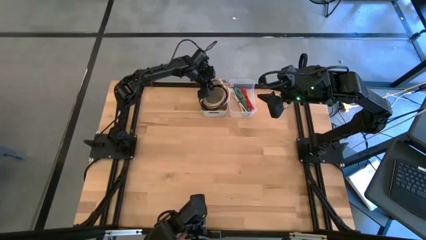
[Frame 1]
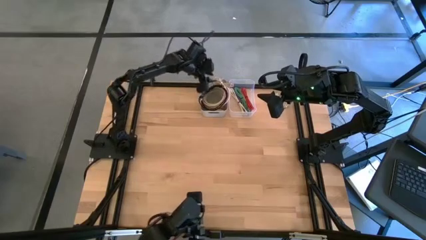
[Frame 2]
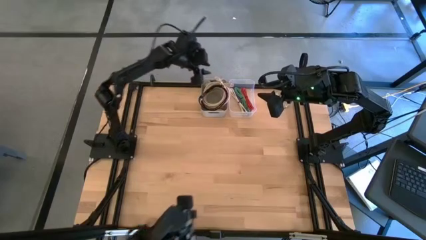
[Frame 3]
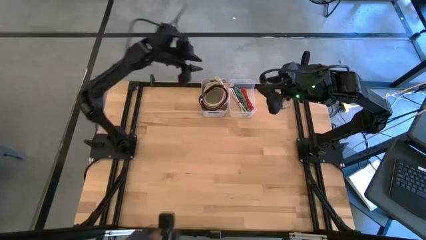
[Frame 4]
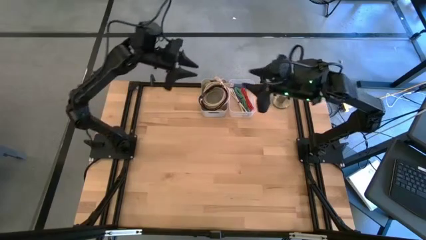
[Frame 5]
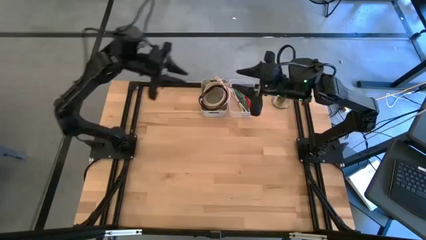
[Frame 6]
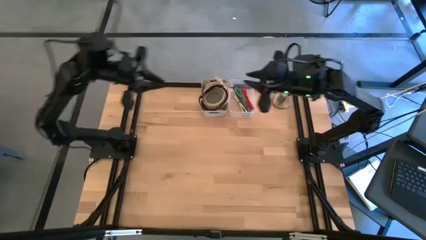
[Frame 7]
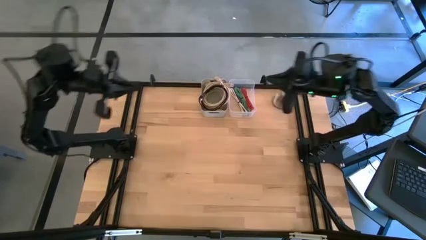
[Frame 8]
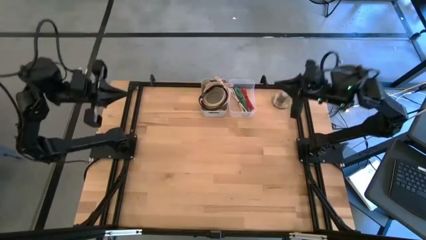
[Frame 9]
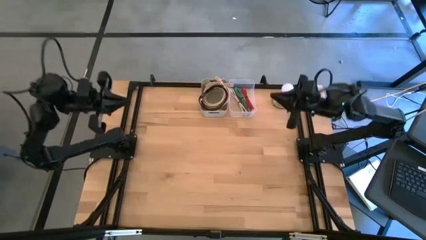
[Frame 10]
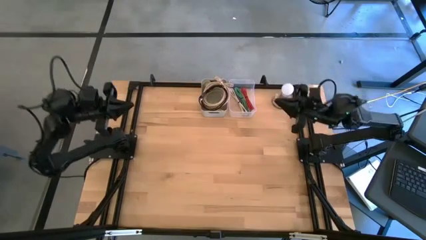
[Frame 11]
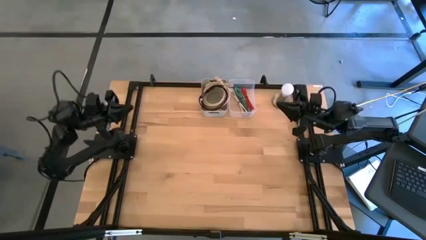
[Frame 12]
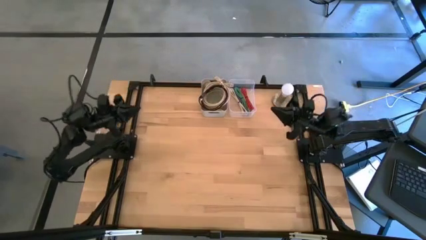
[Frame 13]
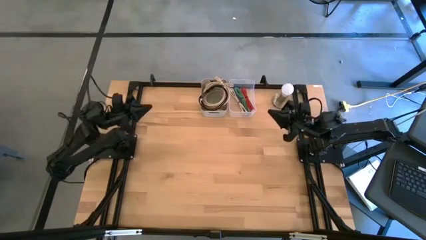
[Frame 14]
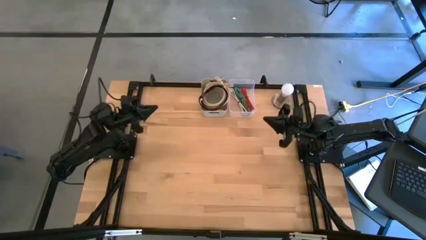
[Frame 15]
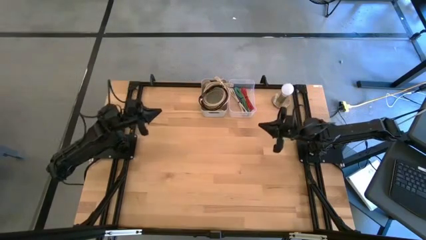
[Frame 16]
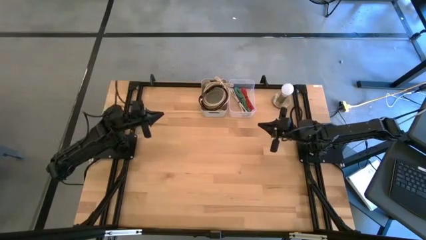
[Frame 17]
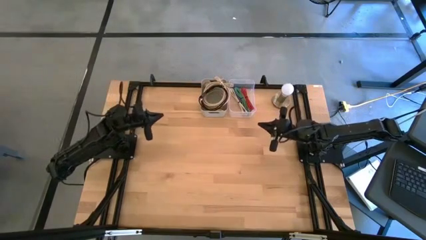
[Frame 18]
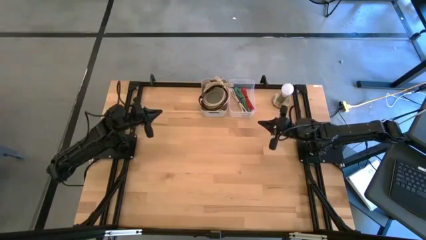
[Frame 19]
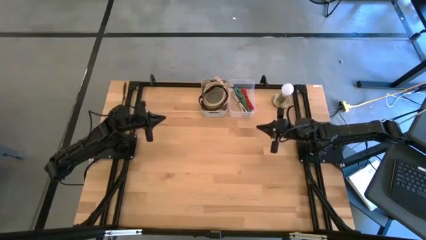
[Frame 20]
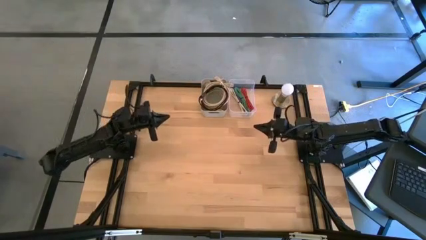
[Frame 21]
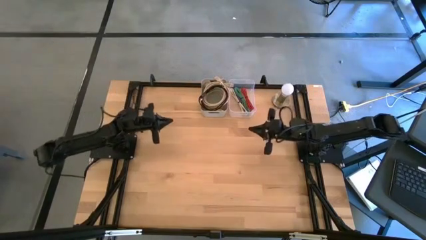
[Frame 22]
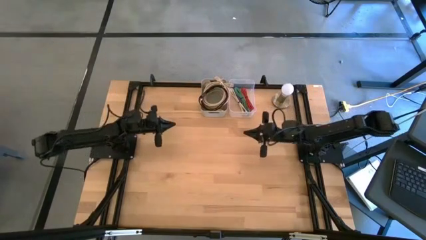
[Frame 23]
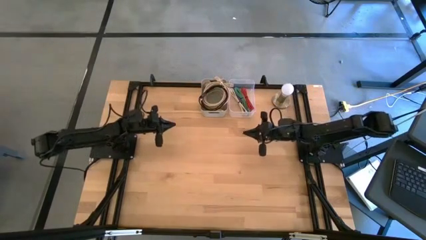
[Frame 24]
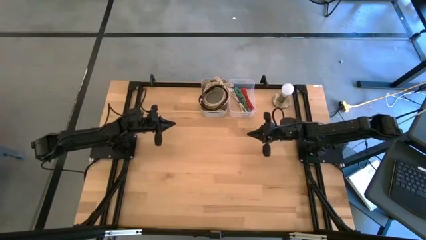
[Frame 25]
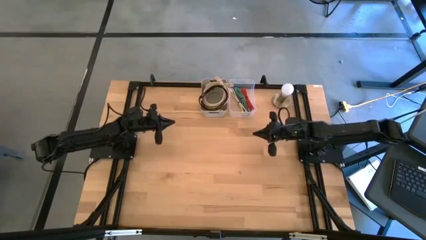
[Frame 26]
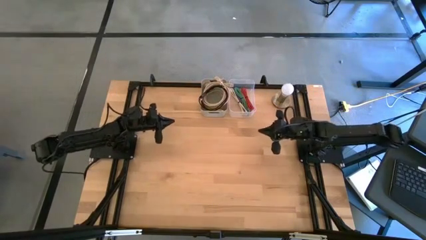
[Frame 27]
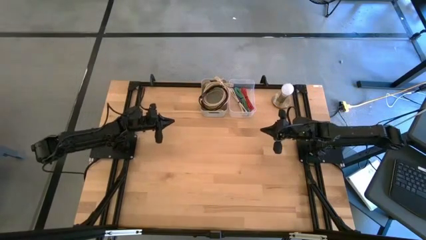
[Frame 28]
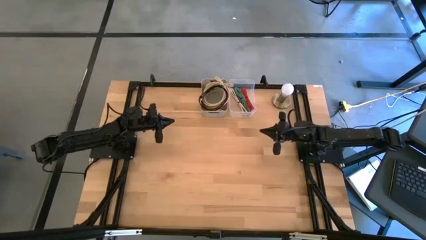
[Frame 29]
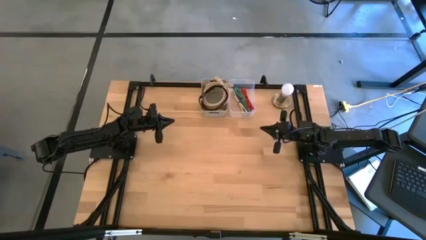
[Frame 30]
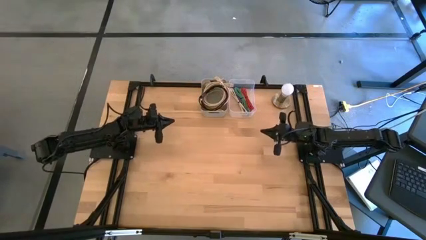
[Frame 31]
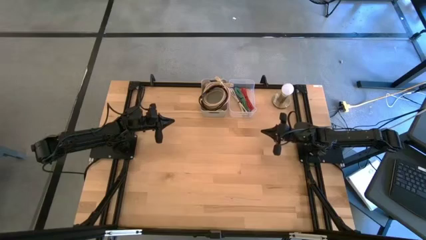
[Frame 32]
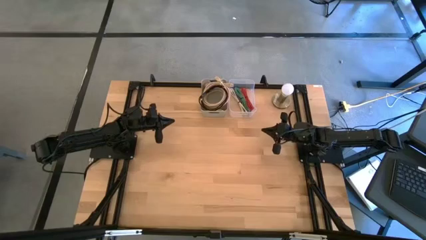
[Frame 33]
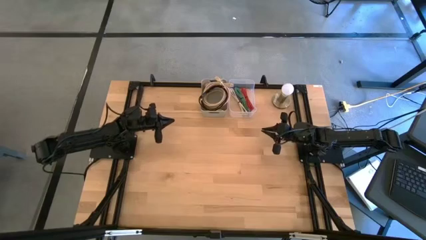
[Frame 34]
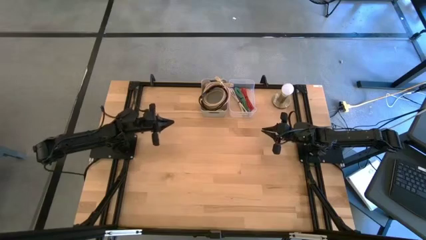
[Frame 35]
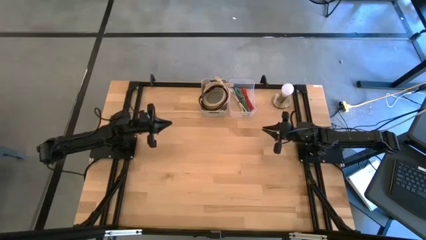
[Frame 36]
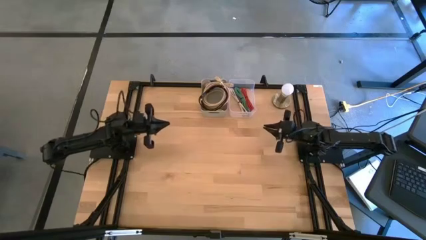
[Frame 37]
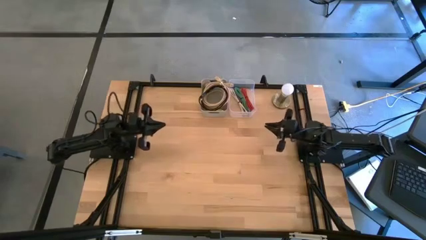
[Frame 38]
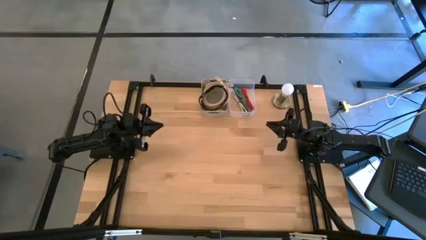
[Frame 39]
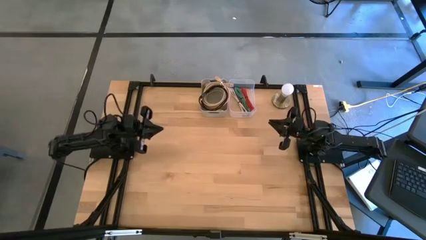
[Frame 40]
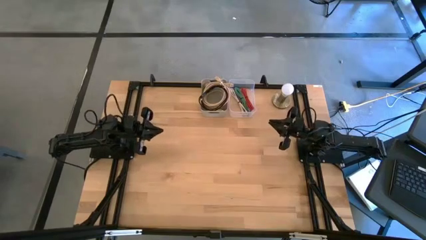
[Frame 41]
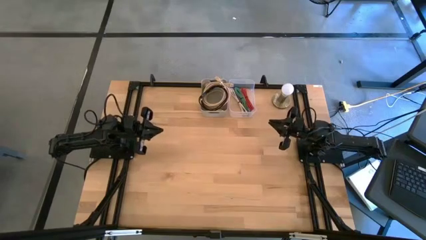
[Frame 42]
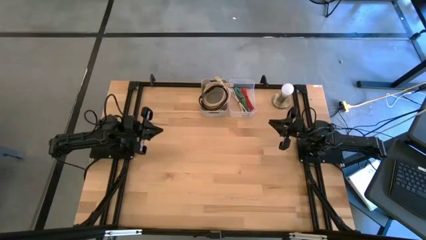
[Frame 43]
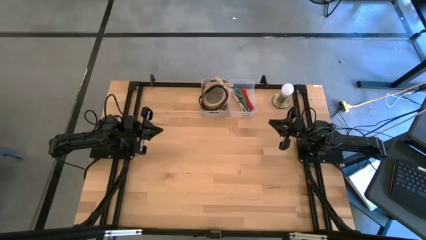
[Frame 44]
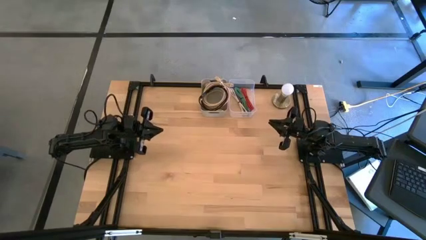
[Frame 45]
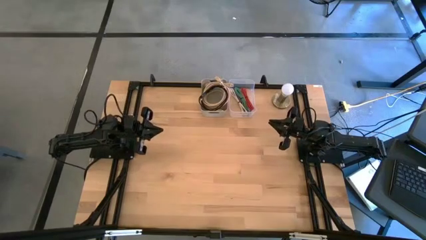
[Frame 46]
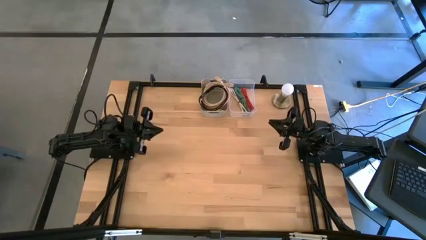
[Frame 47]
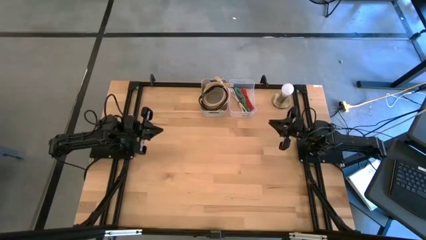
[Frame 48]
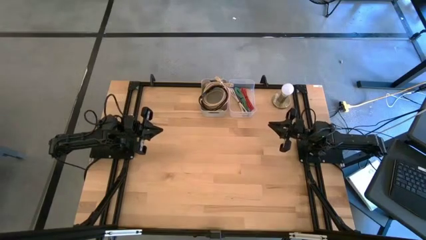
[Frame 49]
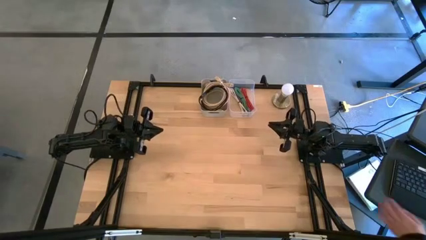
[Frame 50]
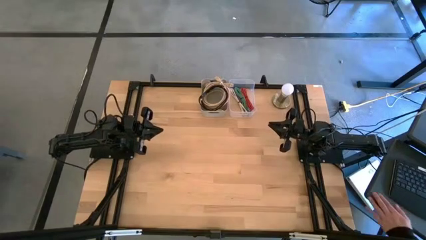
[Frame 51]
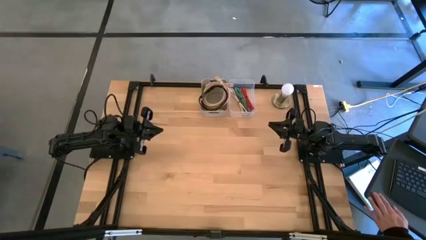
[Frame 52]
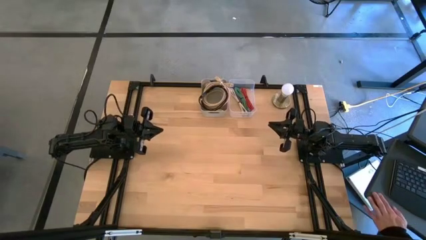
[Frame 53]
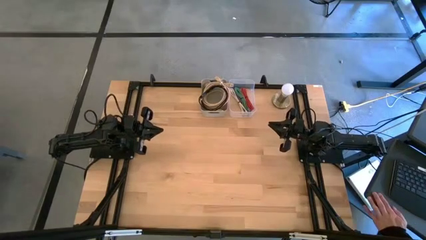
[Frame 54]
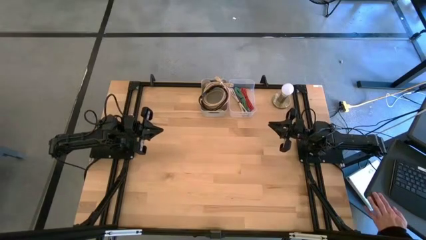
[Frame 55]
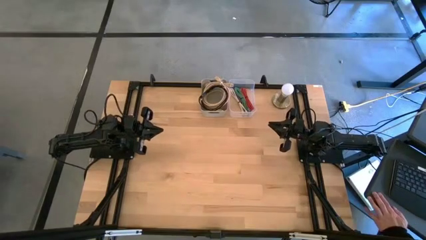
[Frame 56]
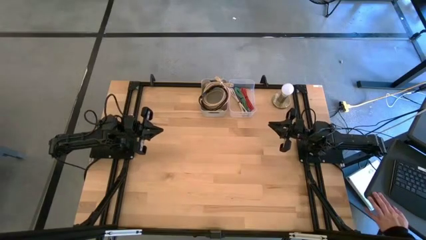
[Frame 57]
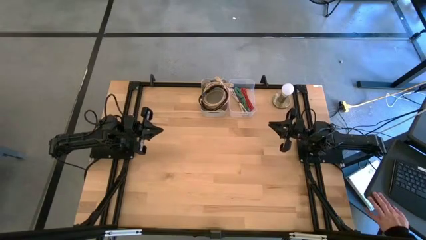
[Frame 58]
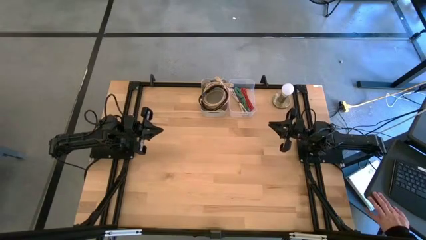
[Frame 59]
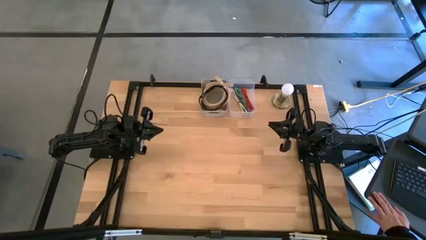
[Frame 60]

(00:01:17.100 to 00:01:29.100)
Return to Home Position
